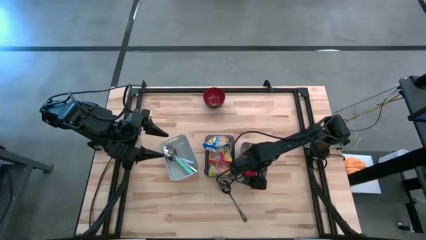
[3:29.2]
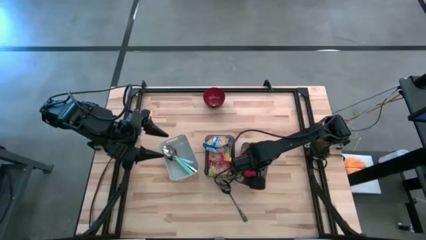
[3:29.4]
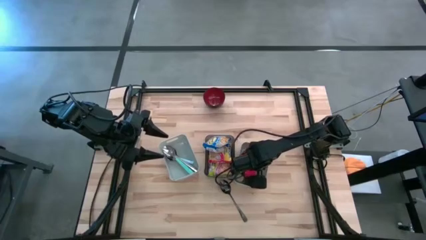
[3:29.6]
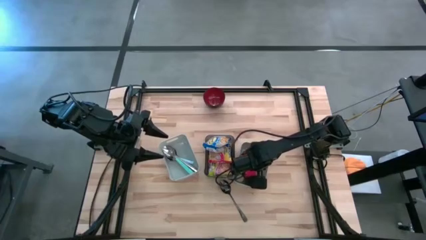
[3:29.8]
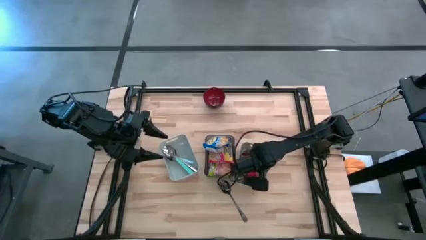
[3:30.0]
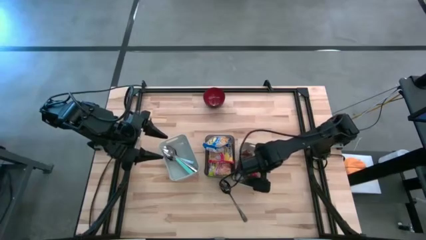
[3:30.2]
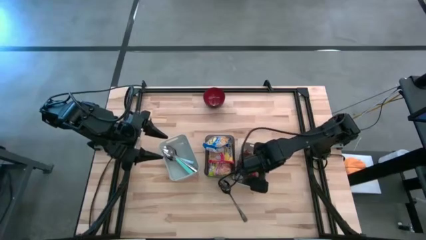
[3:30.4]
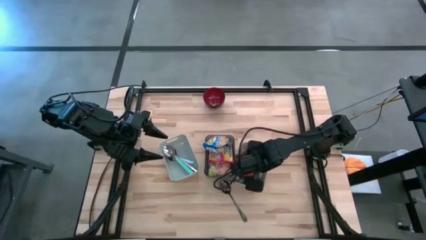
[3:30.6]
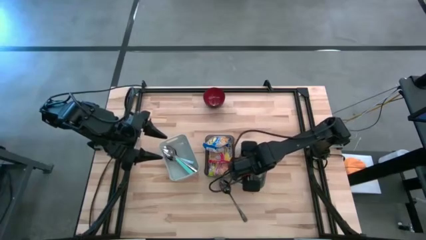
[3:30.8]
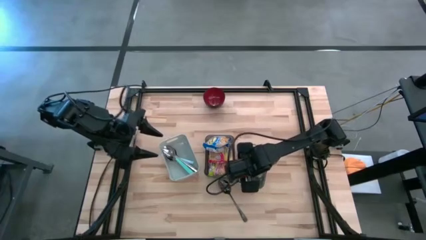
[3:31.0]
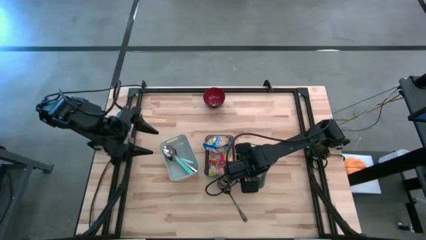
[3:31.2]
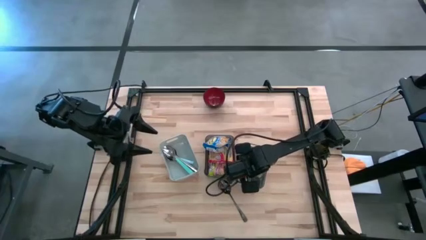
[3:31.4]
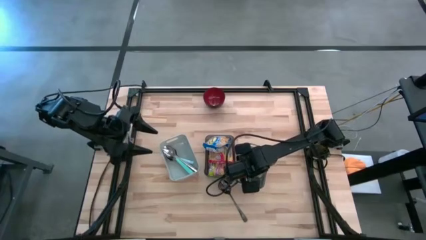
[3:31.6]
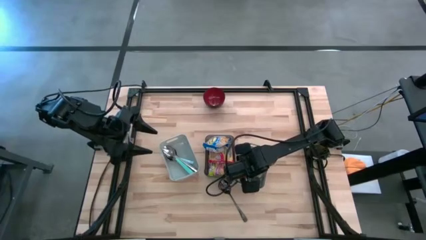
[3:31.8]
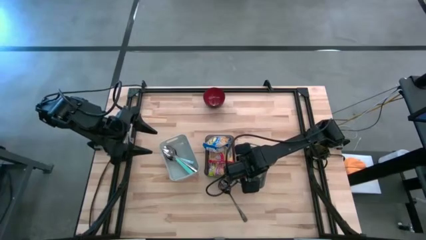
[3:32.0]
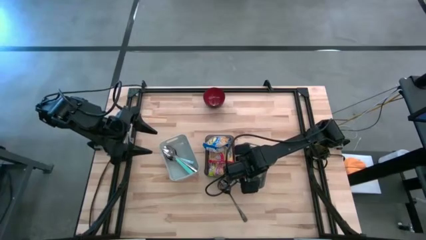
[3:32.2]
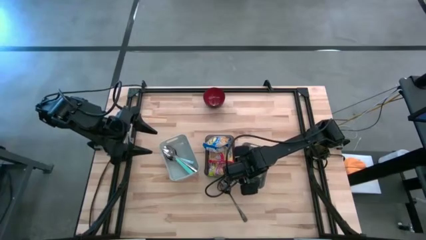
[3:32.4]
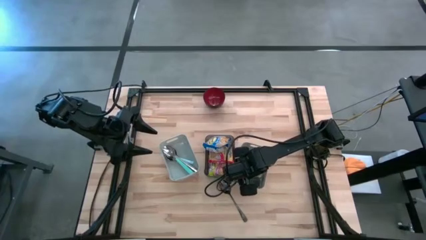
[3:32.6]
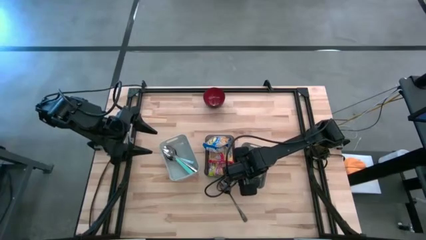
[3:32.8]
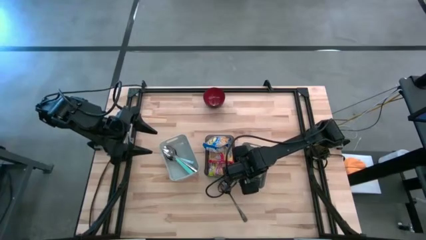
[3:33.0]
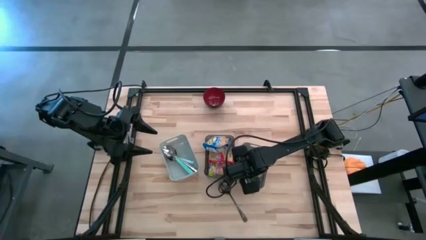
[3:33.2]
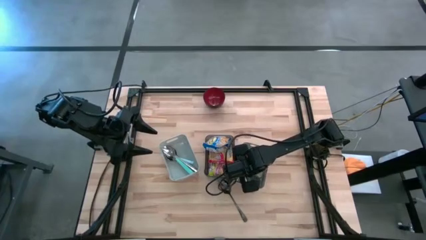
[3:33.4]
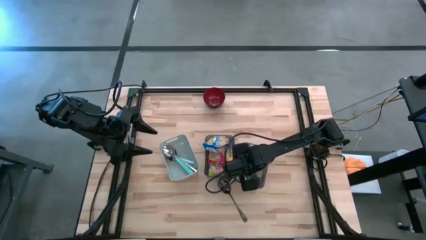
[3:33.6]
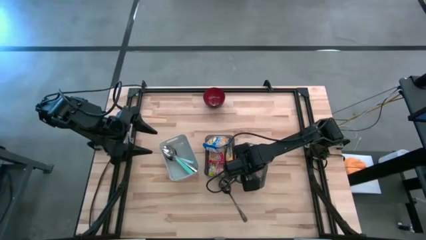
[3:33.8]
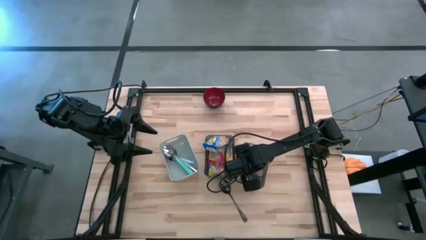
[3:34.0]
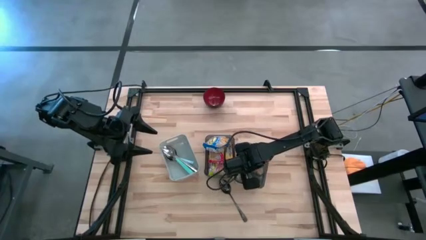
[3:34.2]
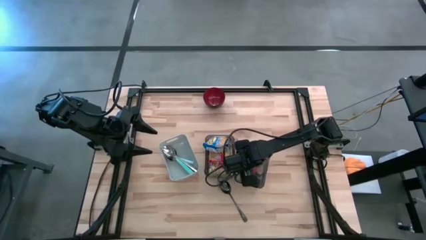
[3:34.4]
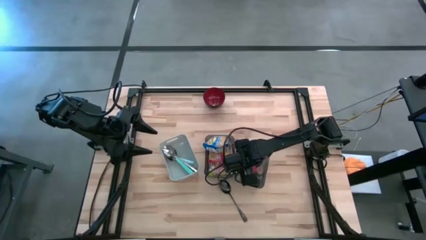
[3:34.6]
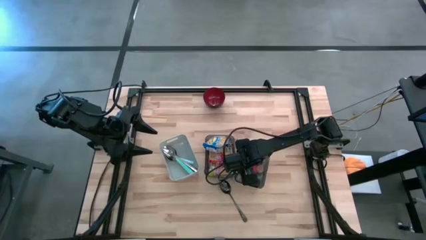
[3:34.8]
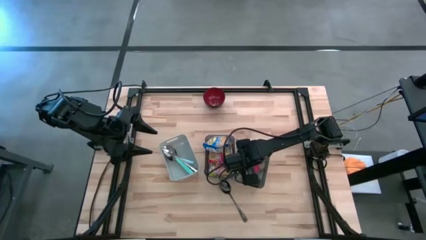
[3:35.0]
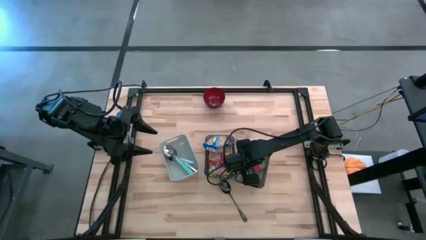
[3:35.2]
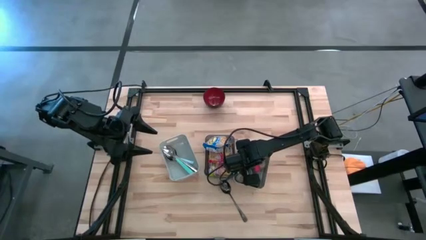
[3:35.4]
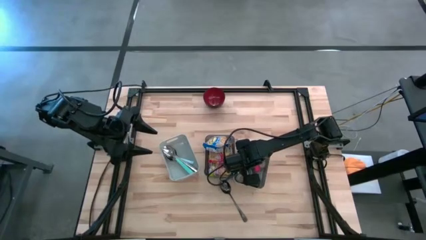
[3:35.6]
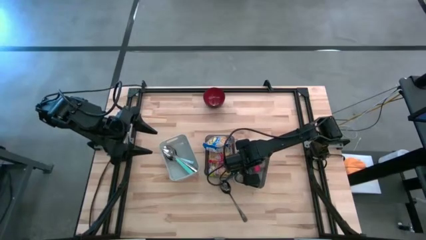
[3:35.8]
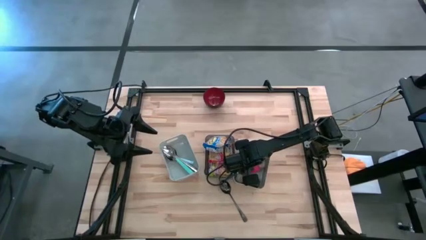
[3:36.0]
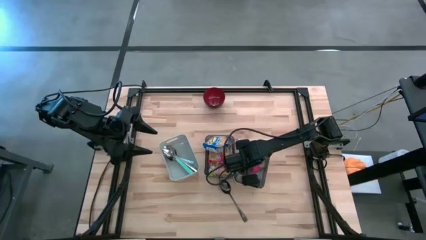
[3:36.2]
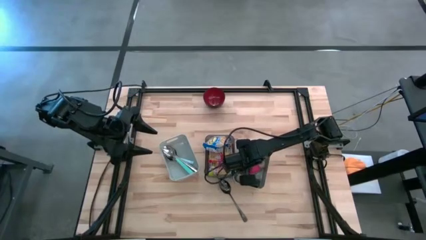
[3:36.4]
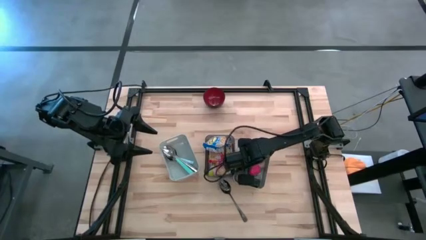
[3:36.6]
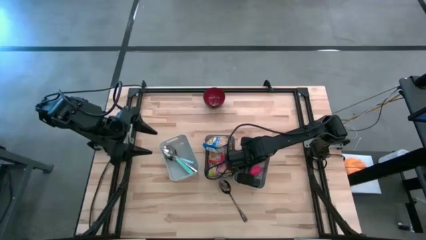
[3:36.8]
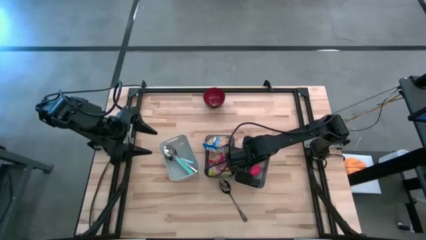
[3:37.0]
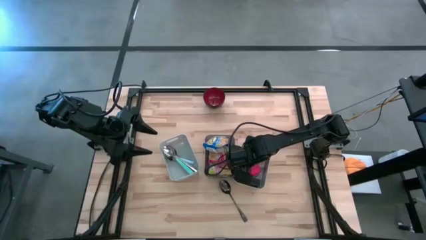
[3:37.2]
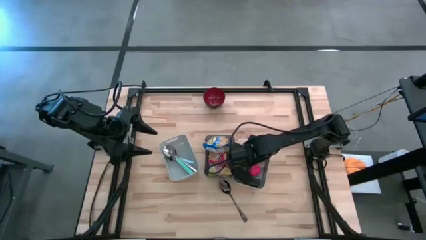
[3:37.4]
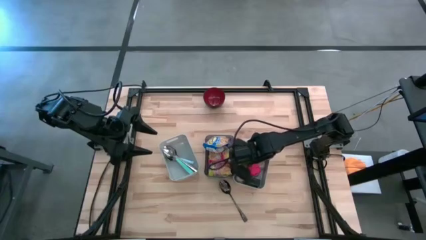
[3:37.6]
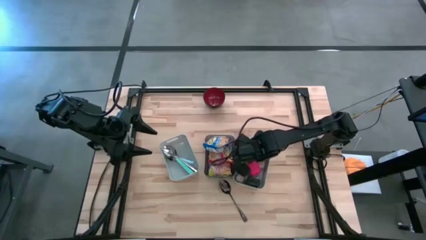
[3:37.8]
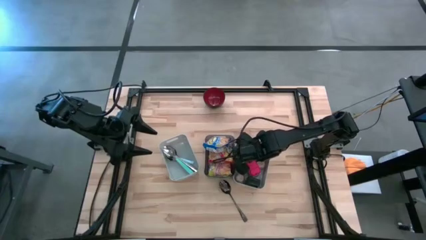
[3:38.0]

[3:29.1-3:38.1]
Adjust the orange seasoning in the gray bin

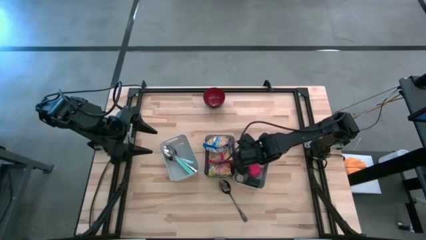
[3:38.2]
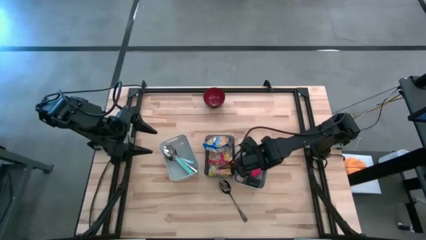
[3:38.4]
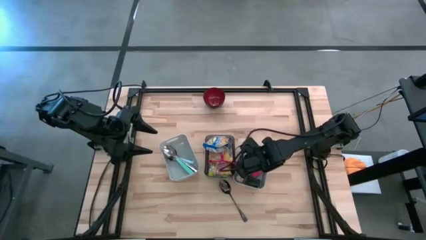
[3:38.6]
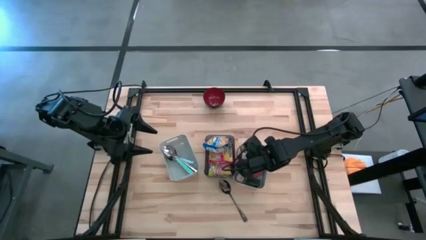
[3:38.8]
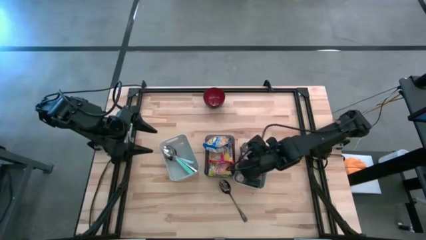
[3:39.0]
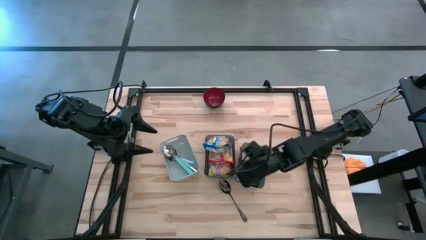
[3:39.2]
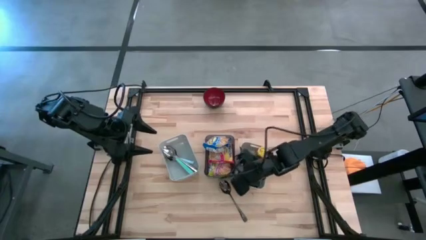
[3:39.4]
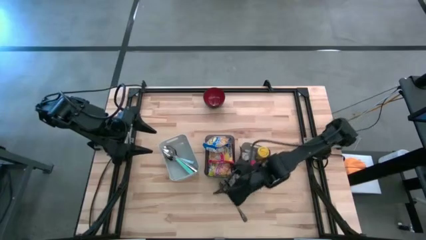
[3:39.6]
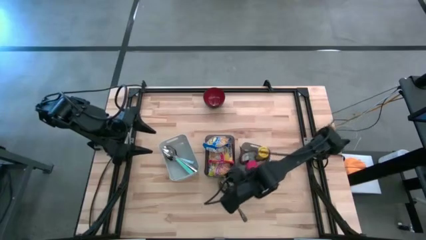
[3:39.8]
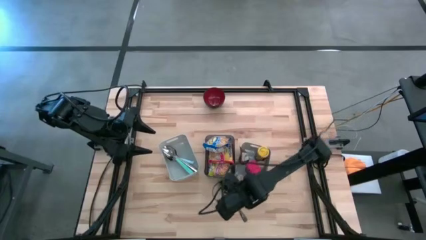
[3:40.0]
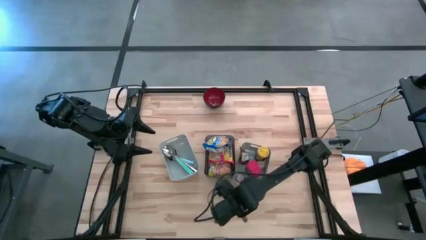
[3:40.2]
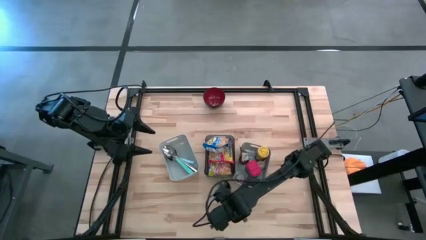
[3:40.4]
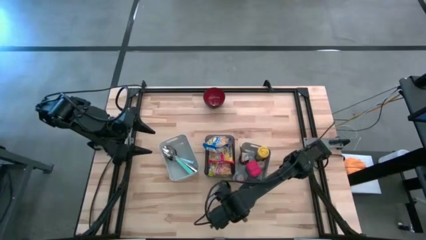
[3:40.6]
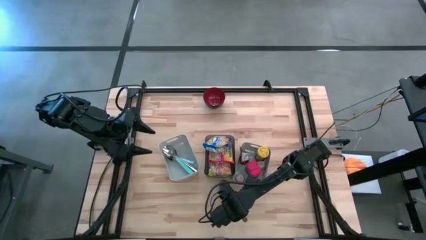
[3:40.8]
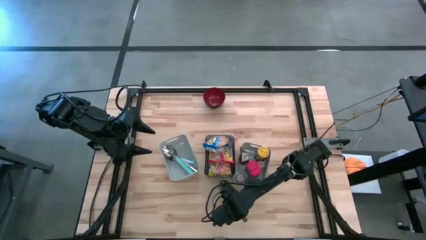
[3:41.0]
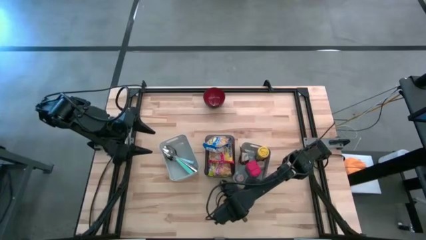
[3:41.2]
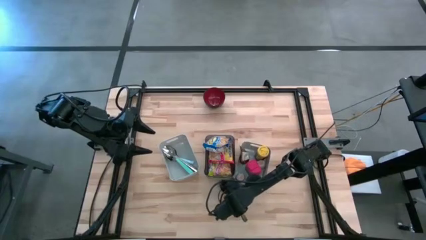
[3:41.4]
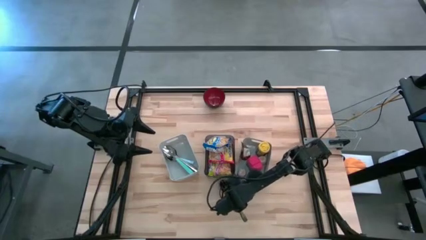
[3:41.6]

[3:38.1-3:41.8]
Adjust the right gray bin
